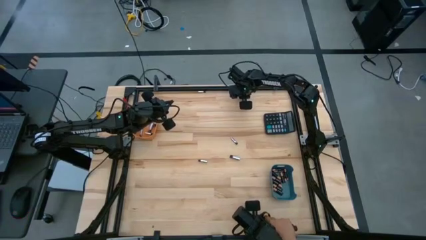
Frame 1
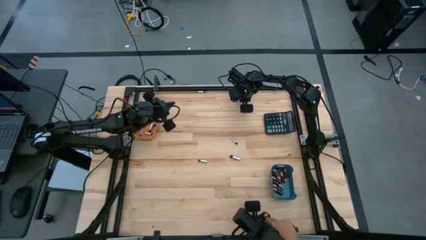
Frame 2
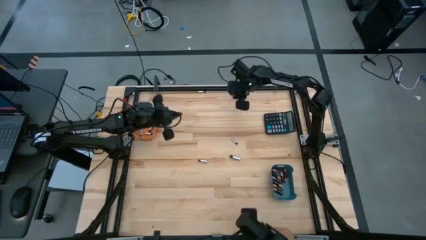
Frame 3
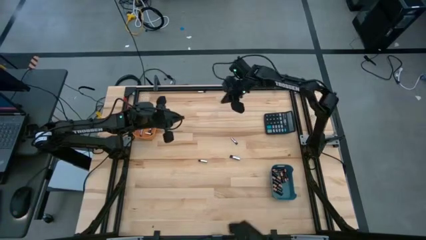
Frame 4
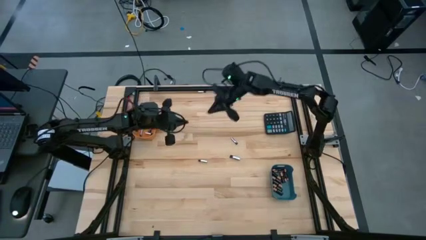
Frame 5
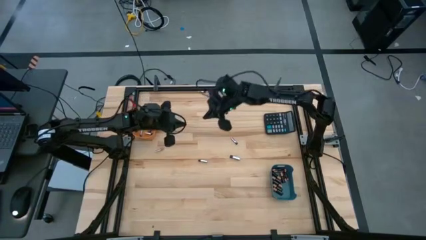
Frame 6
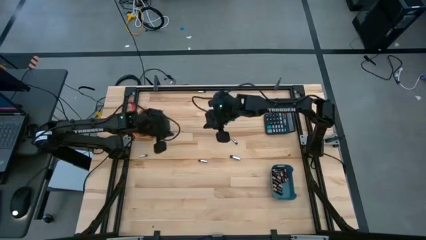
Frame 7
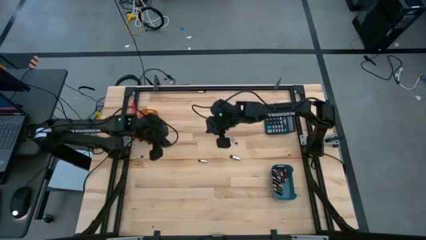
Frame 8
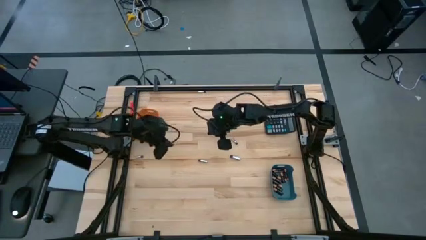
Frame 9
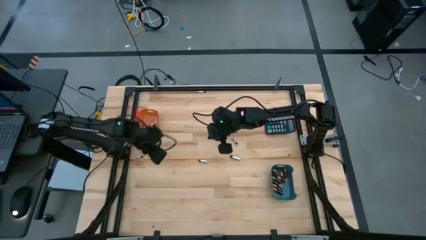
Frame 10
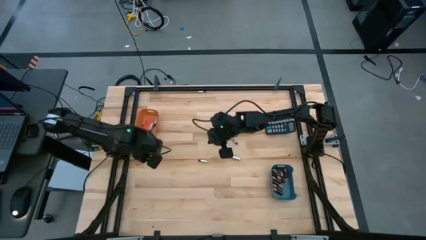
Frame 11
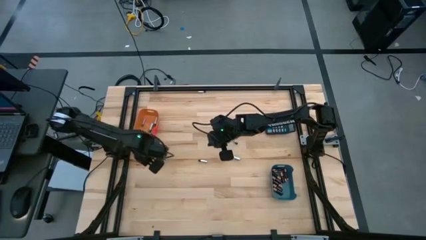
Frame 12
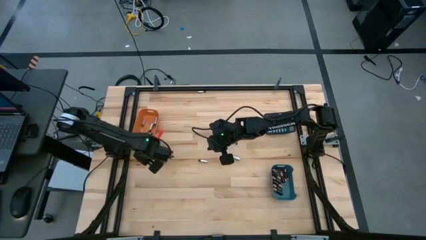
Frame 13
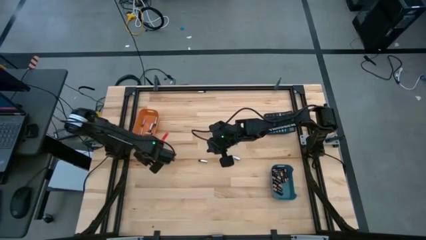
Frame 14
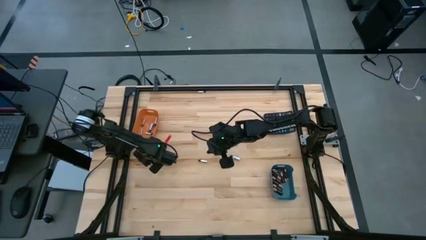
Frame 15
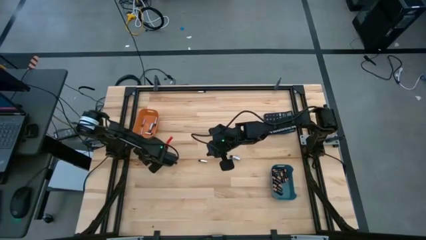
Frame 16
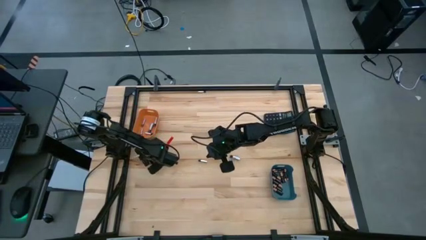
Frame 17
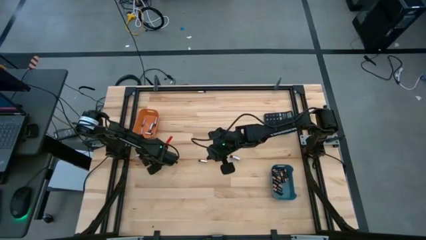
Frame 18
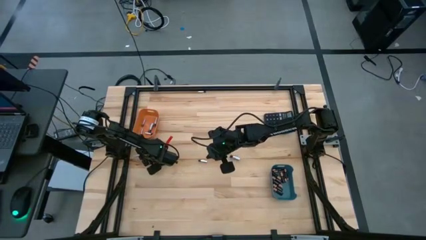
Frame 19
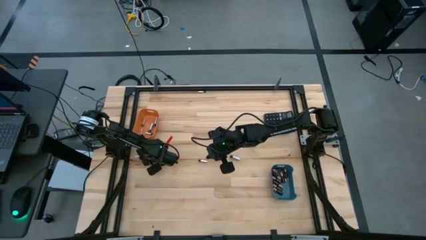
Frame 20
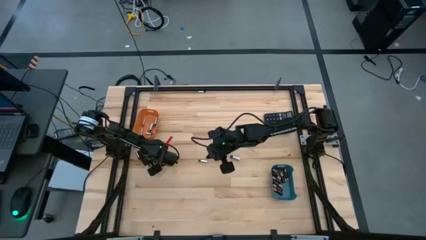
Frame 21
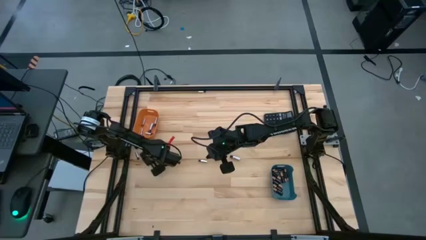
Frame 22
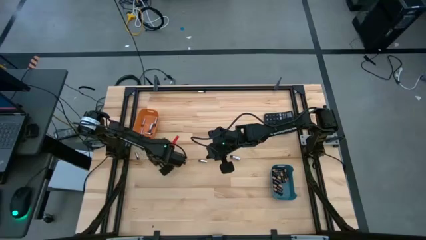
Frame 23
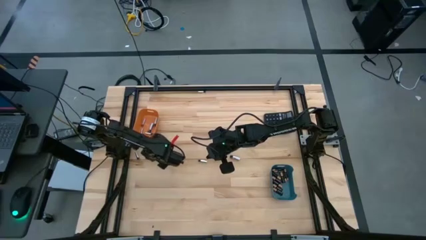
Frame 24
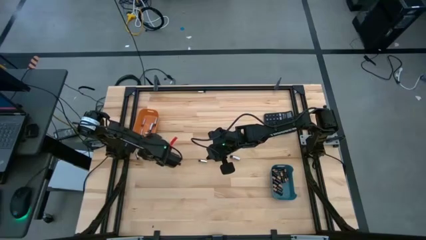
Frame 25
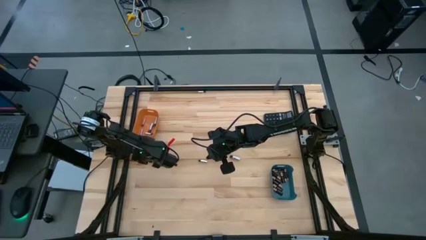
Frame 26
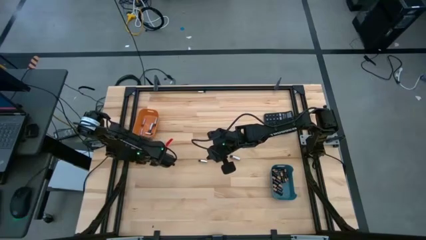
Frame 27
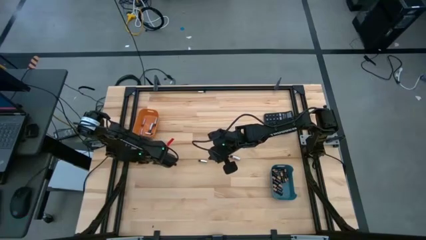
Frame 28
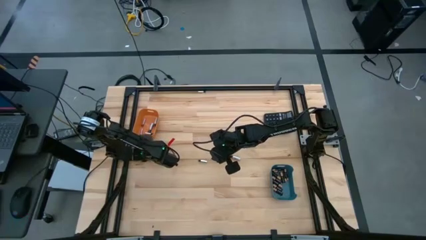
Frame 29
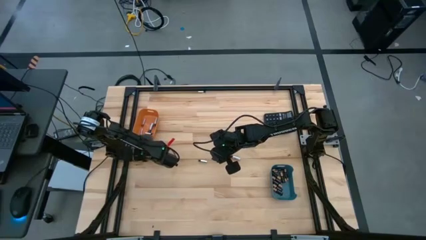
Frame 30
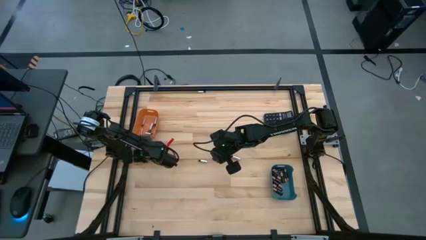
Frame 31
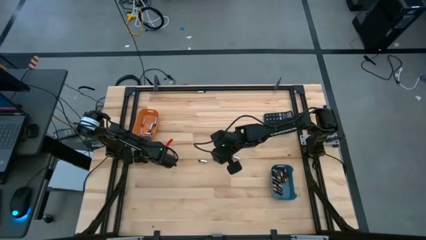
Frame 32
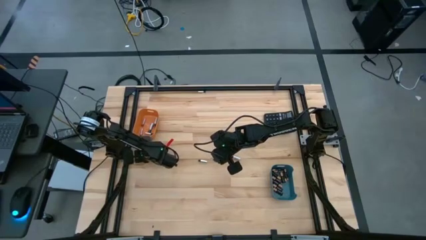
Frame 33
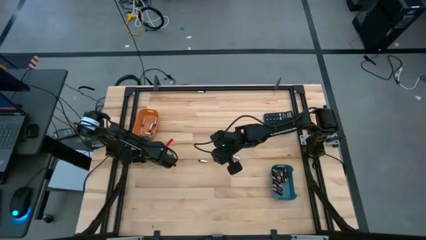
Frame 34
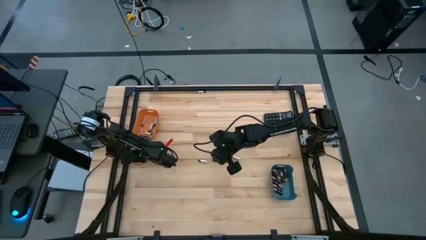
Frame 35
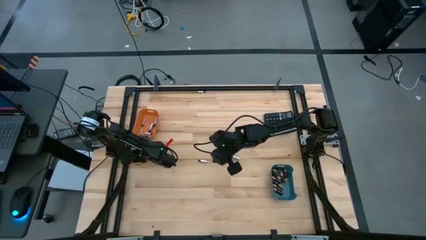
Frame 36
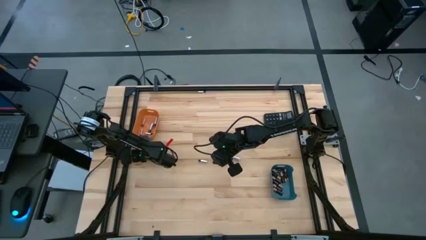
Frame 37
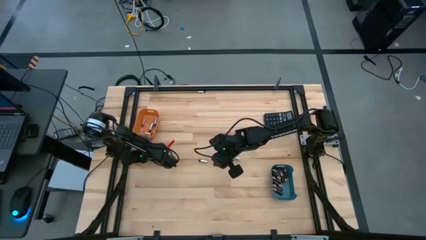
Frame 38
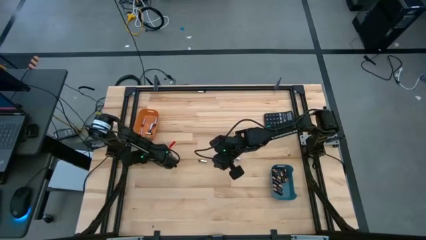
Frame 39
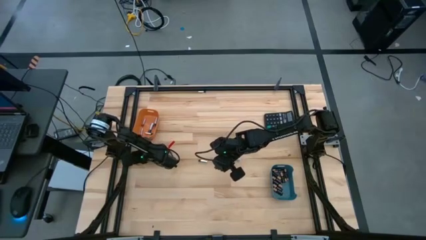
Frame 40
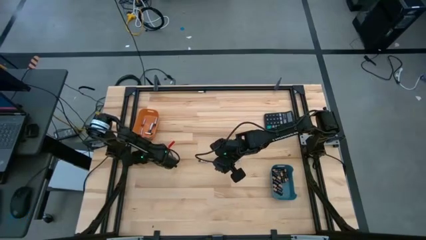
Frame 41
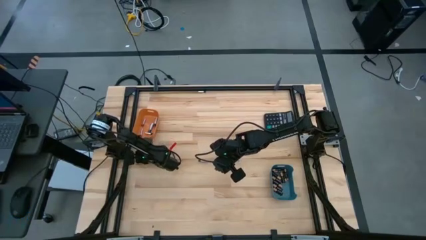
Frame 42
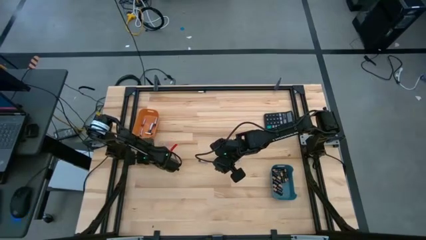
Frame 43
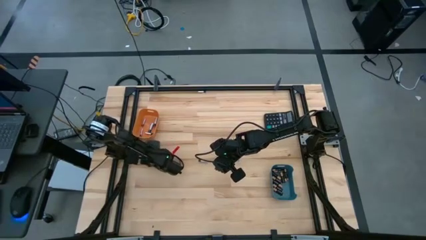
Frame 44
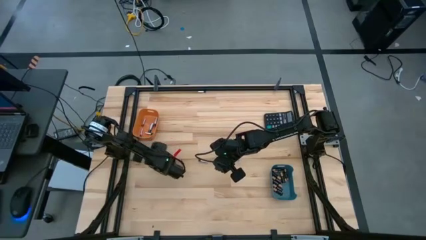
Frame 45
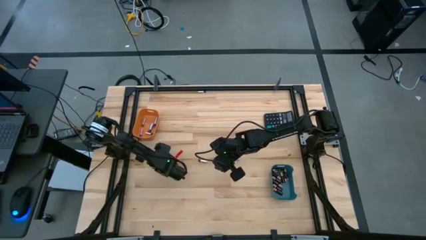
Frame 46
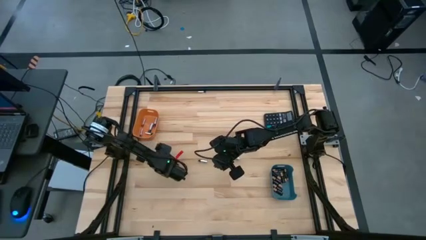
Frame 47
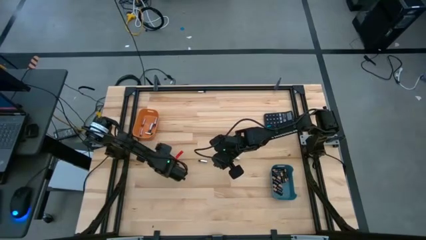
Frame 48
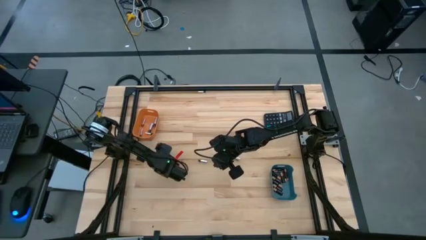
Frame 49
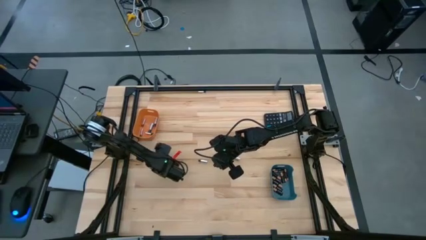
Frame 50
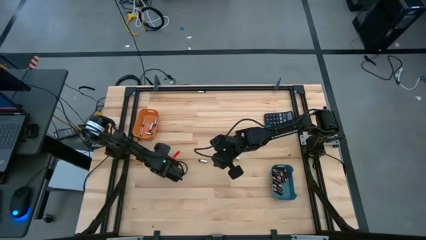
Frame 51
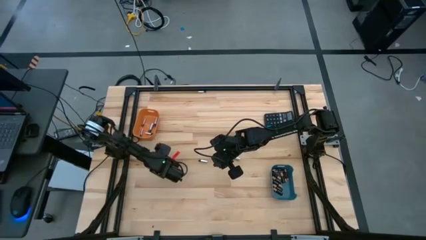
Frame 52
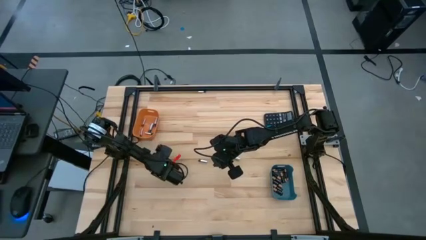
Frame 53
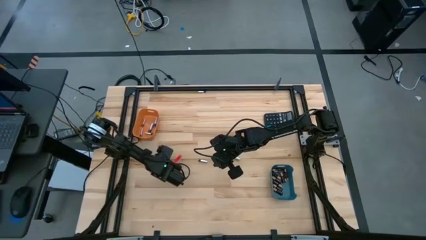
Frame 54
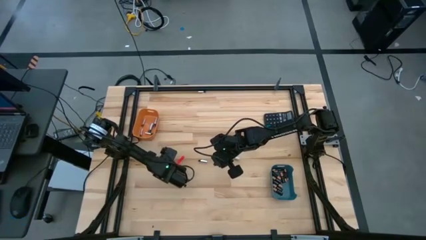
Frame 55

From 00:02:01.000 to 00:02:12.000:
Task: Sort batteries
Put the silver battery into the orange bin

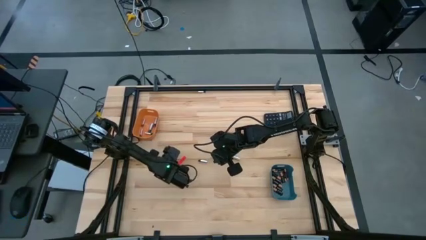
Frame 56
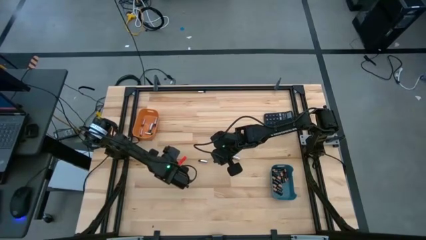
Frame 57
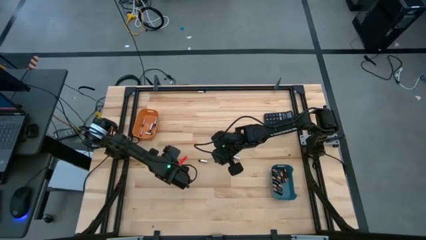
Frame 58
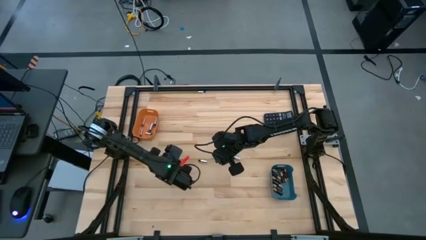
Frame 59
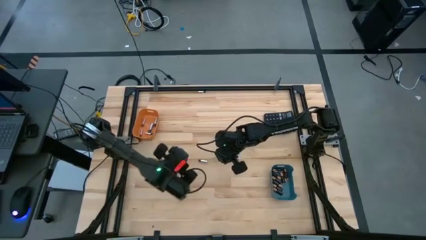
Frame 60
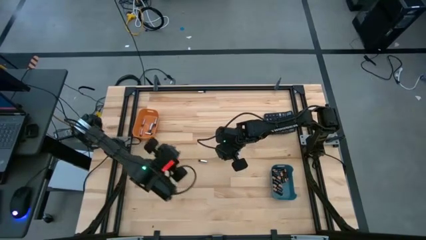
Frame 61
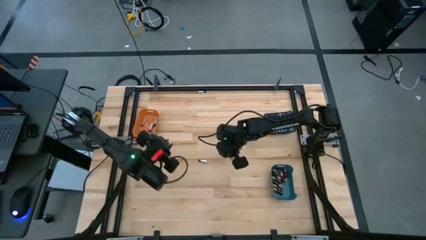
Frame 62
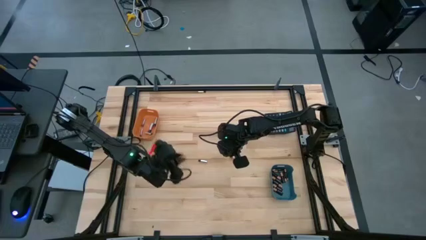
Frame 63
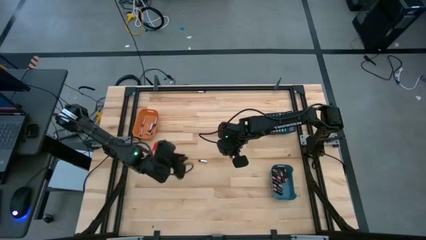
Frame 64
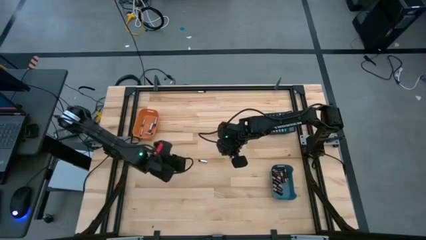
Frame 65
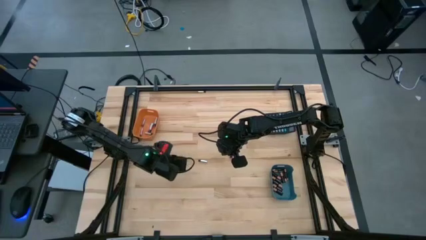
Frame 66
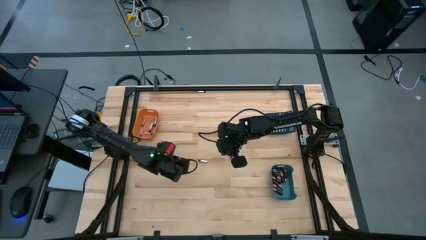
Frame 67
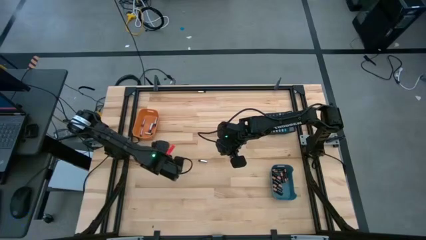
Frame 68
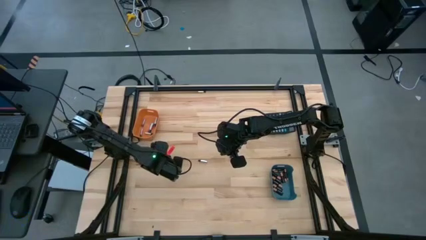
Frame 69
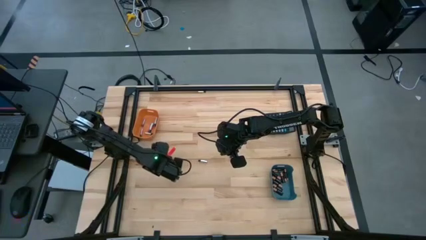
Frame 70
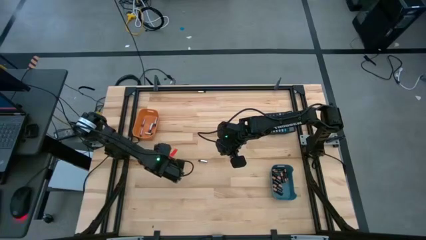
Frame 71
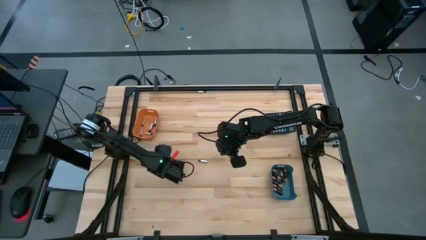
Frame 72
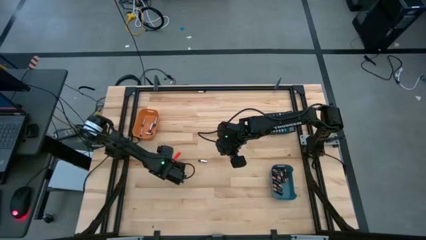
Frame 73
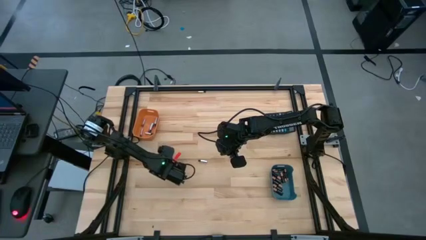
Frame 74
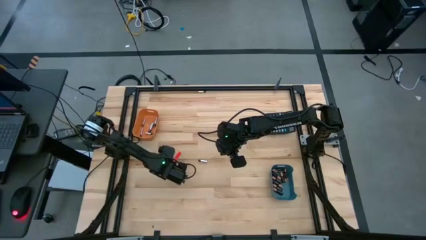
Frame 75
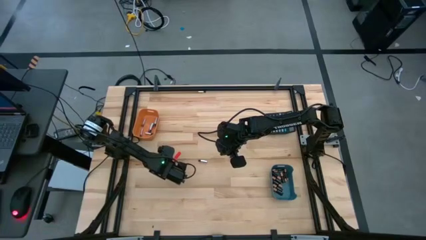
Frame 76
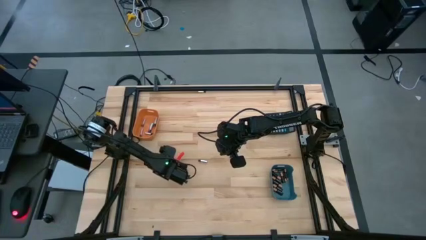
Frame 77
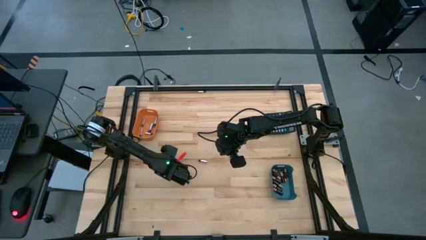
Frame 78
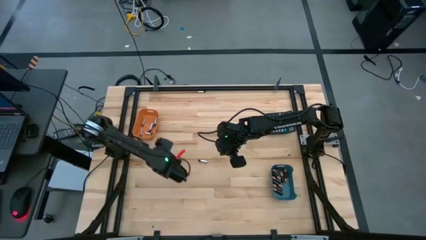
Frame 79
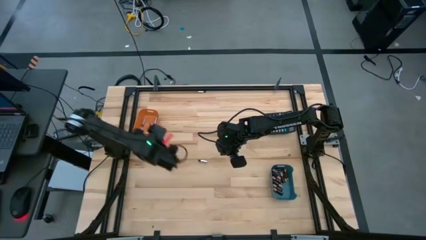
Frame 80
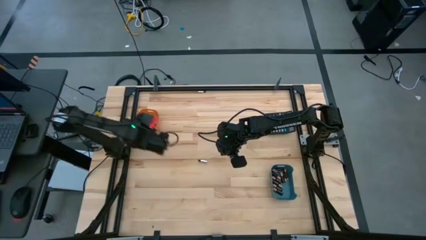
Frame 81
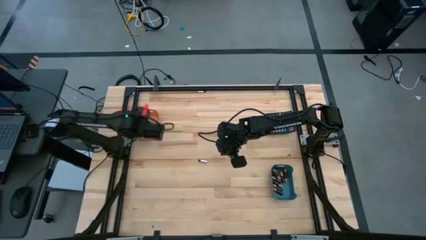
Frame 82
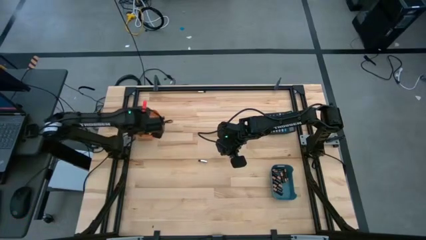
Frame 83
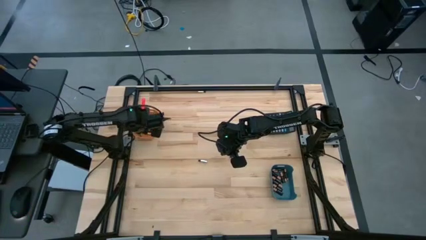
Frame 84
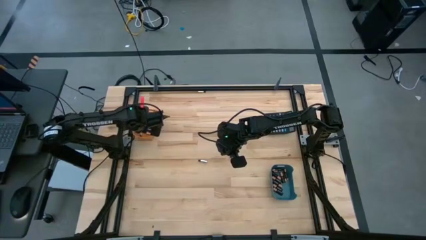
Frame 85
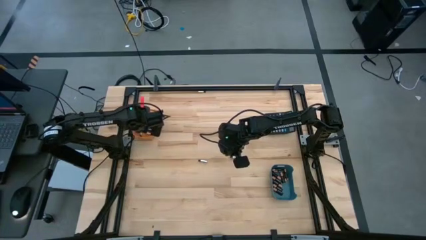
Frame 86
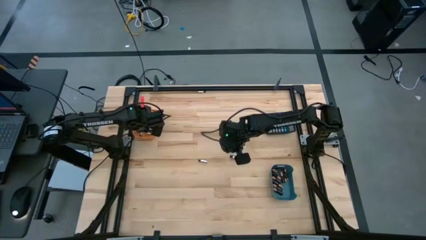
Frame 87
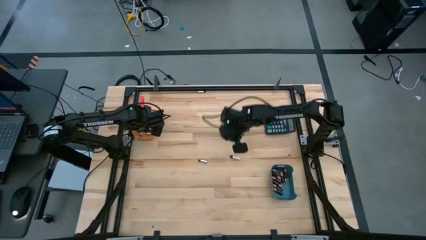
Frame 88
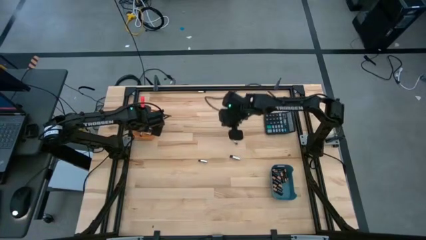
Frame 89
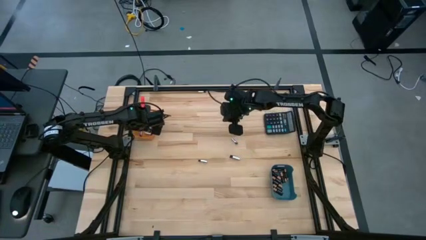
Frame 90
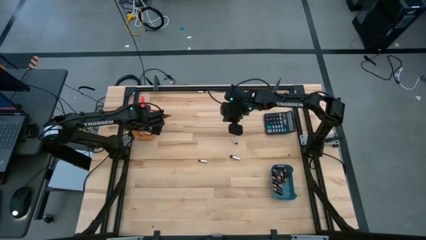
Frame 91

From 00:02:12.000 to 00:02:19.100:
Put the silver battery into the orange bin
